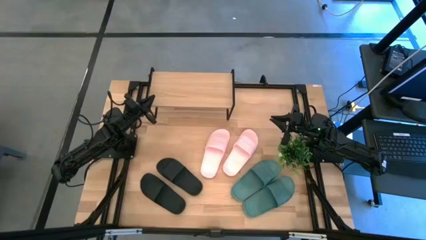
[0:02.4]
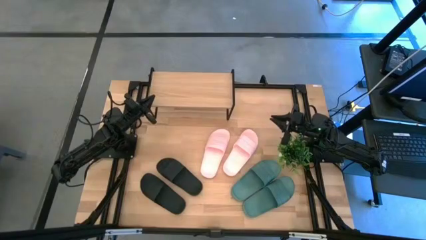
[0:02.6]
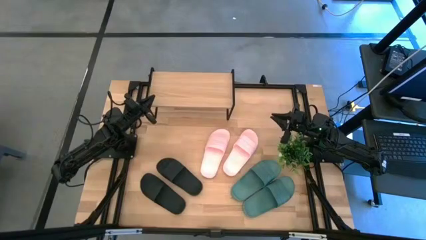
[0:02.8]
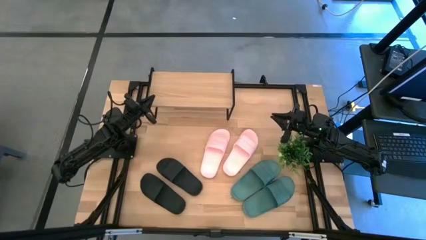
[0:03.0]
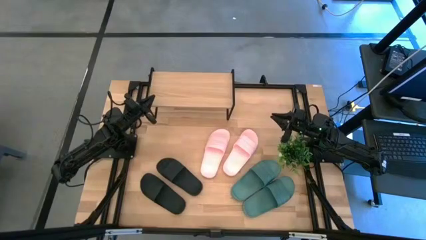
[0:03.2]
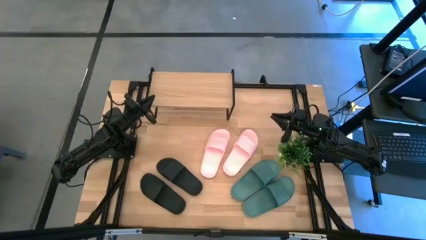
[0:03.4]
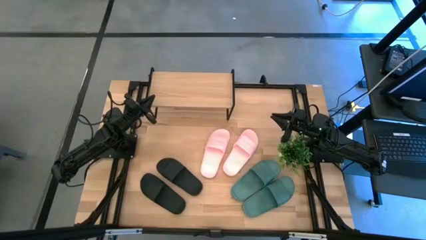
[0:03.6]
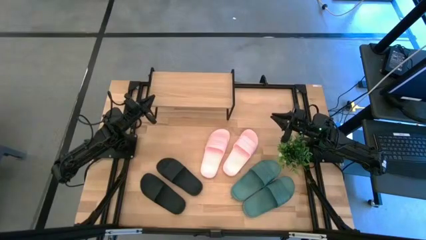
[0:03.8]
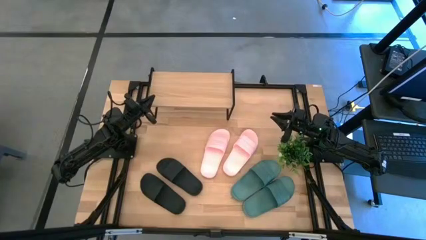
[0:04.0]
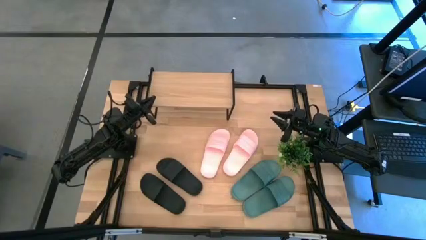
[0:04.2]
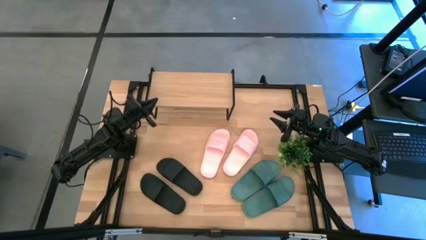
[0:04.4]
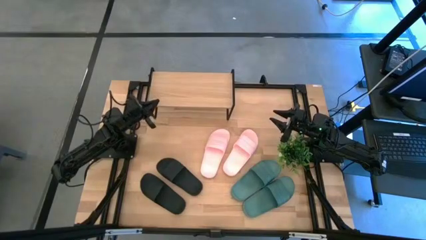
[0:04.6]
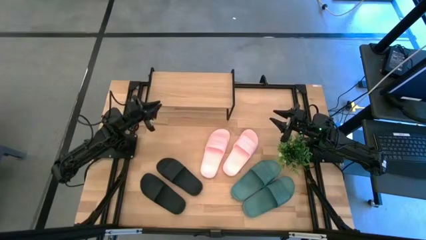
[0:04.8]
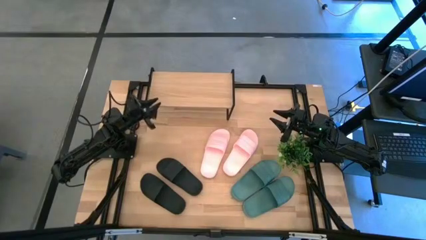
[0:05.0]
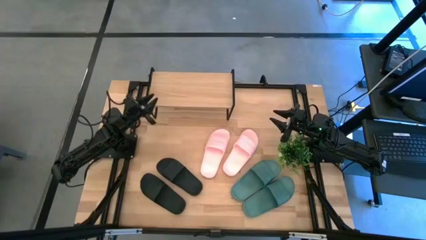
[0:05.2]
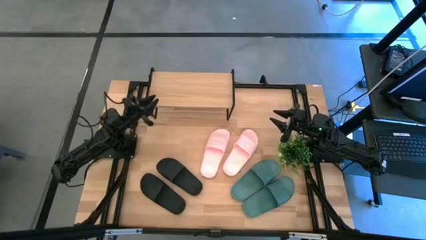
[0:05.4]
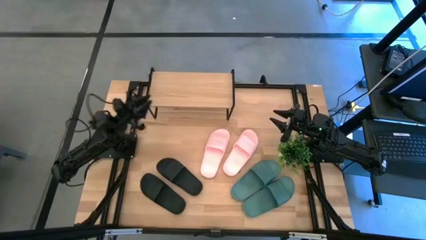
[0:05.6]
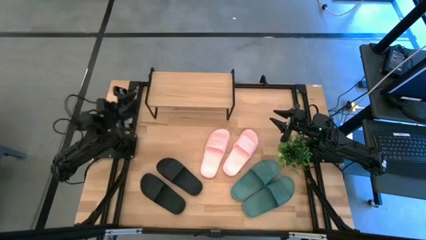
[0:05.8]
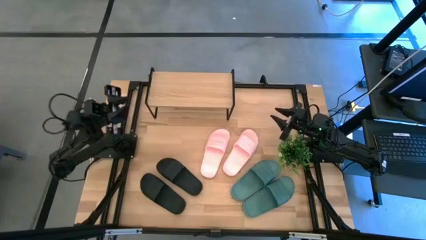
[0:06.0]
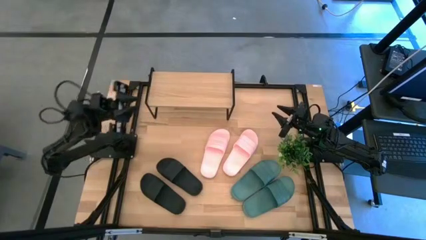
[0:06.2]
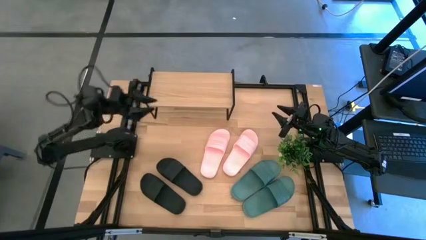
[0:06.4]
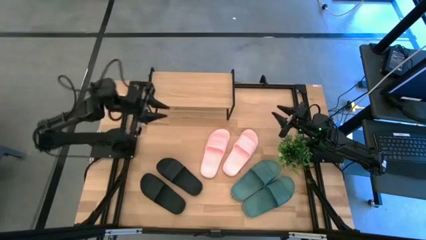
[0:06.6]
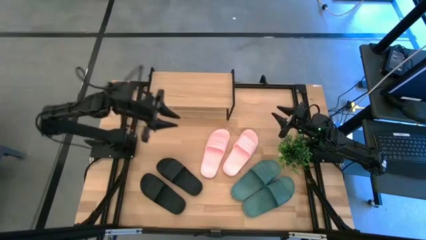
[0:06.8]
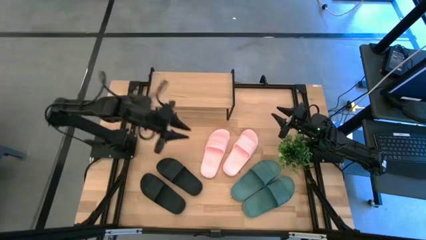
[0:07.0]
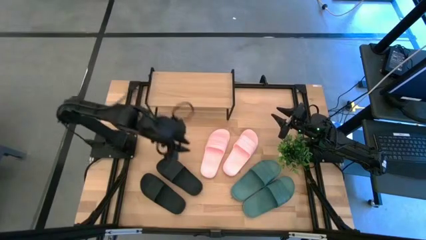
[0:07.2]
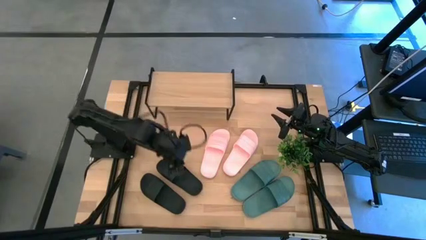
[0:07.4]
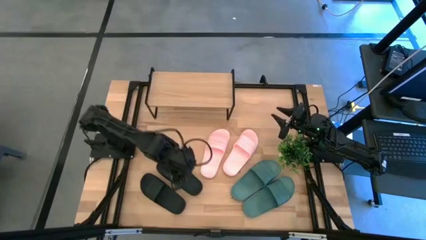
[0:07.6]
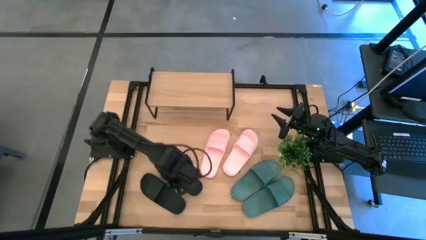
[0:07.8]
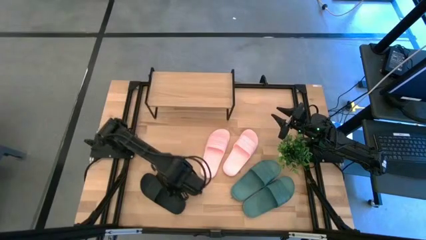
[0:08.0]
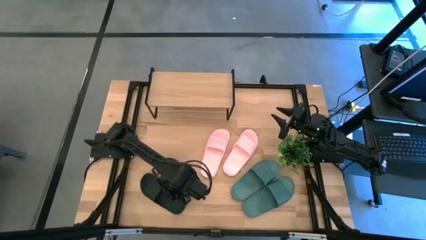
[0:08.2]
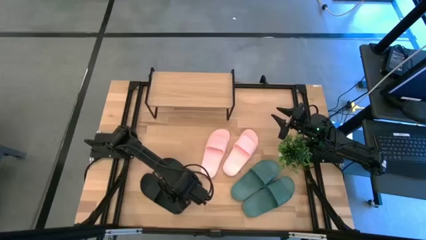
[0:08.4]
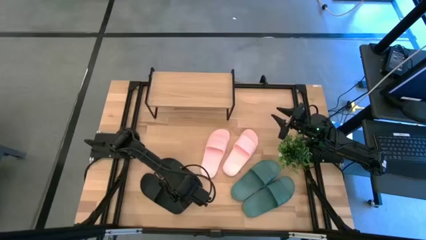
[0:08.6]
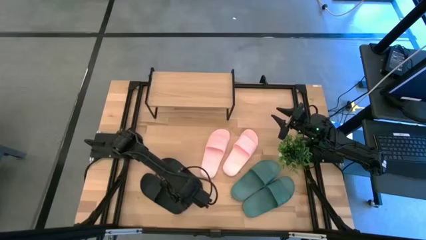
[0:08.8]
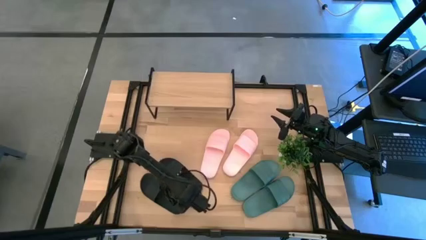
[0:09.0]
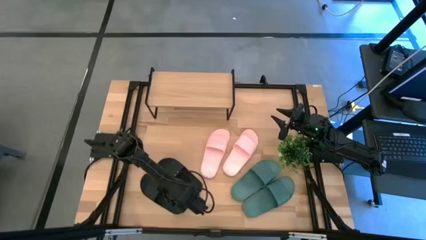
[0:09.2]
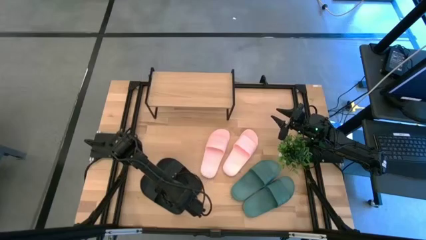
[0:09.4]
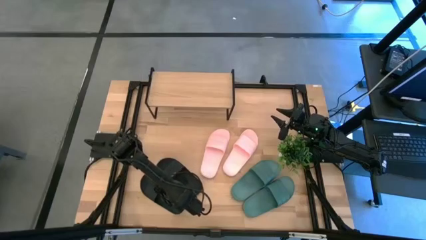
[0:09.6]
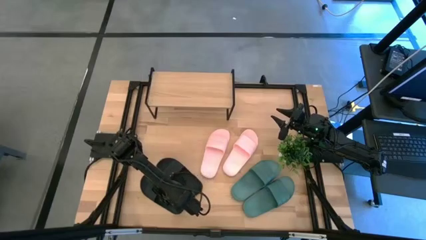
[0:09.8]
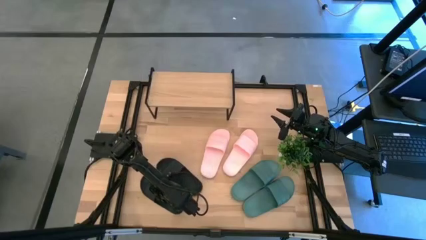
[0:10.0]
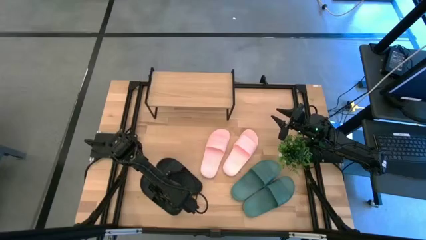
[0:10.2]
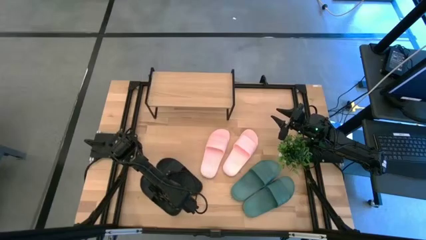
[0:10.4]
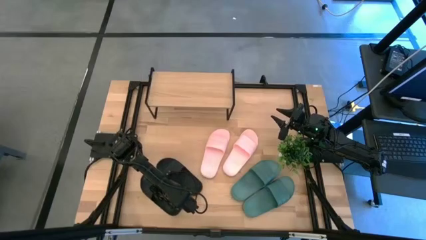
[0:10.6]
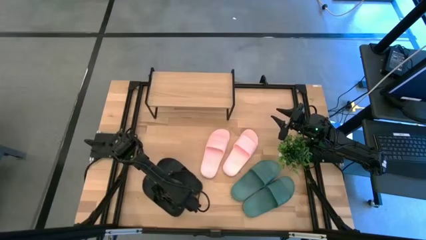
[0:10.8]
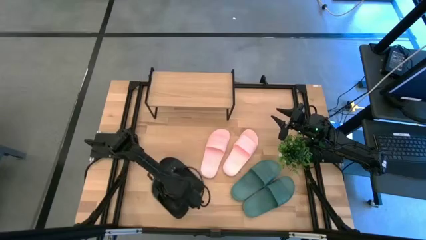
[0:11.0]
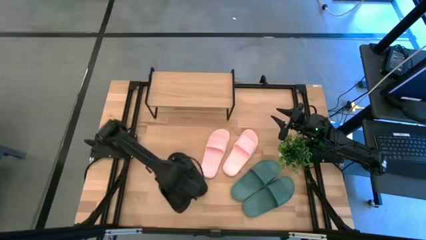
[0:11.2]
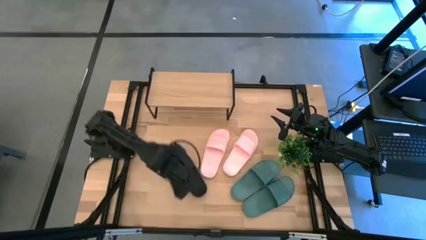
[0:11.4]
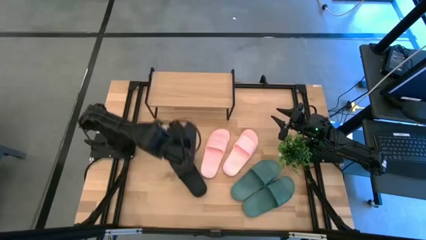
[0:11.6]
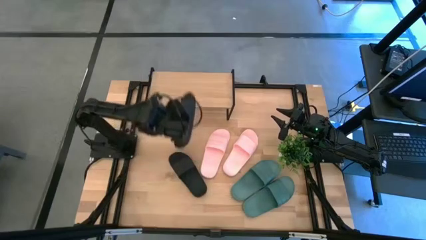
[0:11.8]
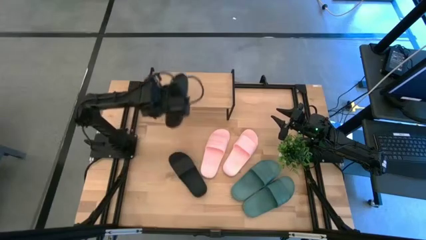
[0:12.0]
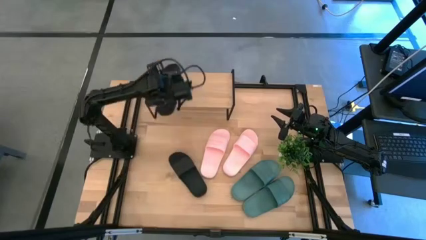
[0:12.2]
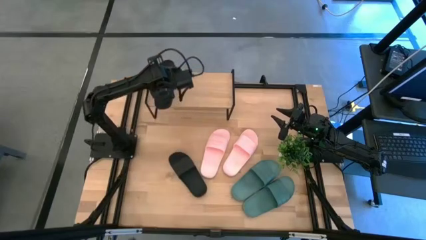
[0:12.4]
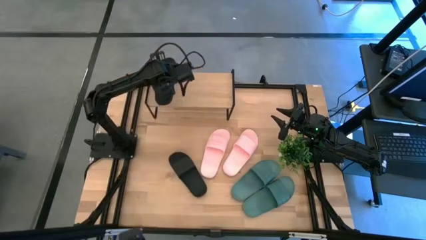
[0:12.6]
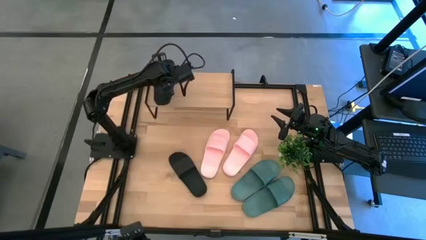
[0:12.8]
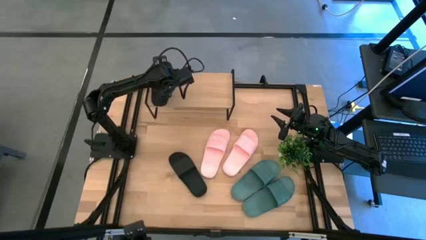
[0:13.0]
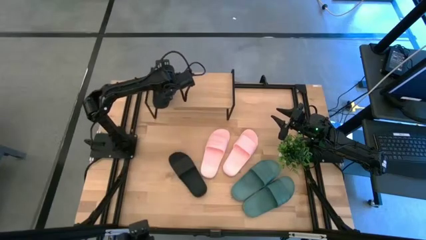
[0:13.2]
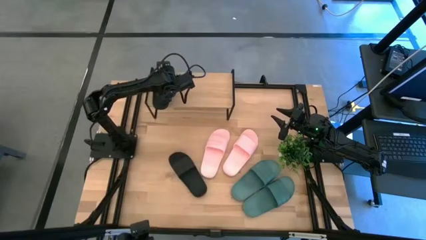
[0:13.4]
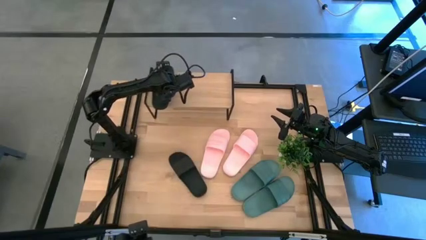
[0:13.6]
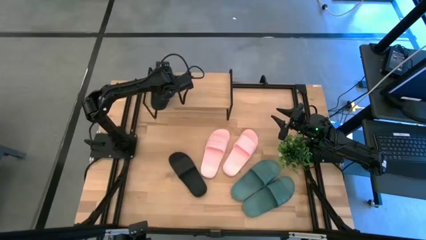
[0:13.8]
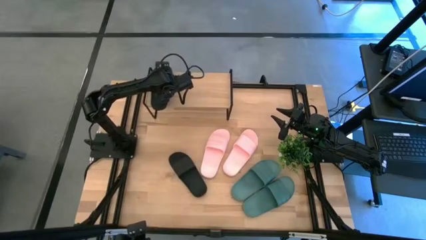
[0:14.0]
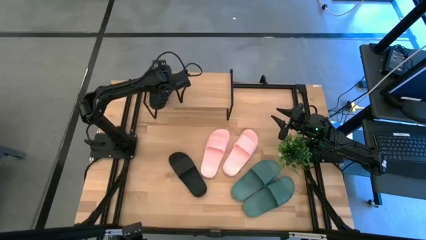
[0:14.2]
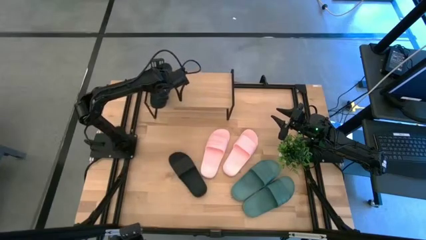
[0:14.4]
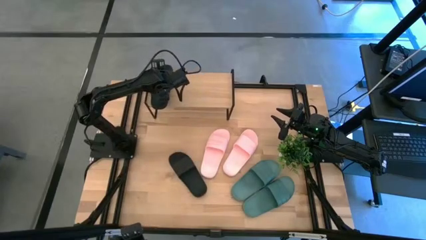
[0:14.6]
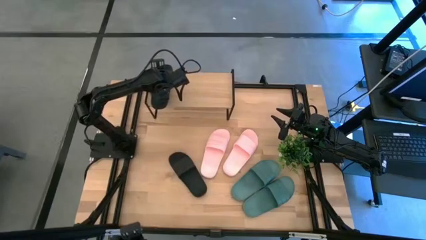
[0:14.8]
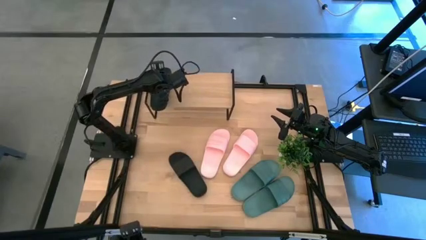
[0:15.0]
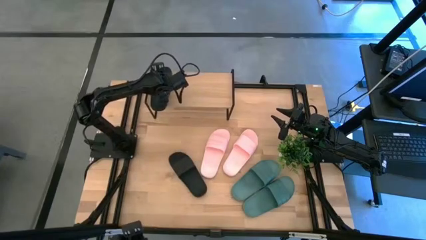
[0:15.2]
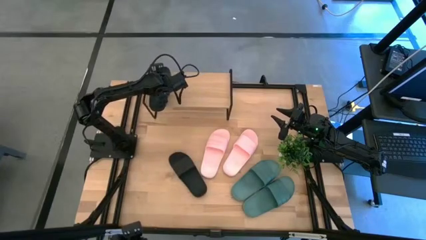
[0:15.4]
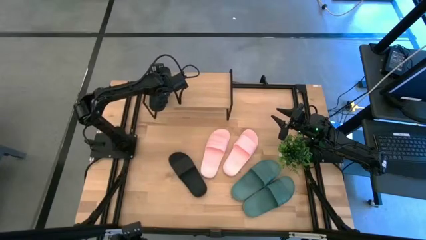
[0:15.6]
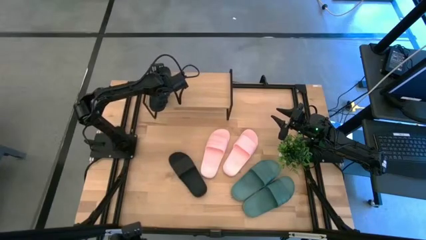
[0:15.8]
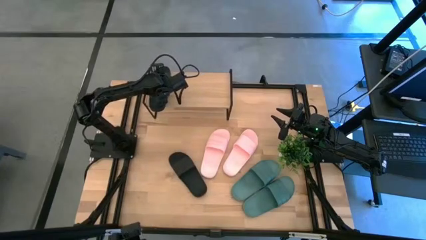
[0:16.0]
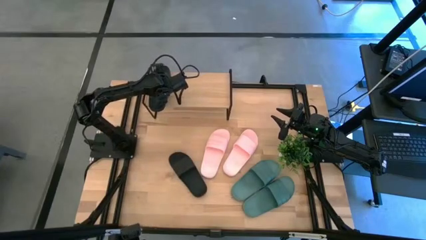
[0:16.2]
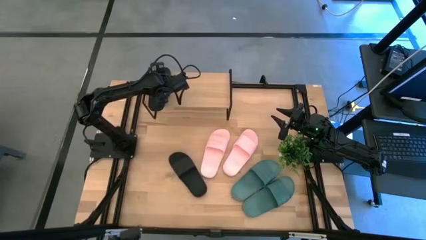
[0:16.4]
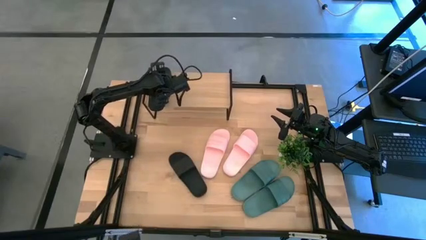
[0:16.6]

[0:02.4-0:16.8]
Task: Pick and place slides into the shelf
Put the left black slide on the shelf
